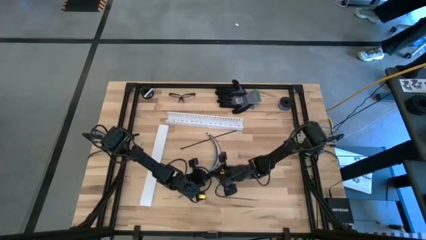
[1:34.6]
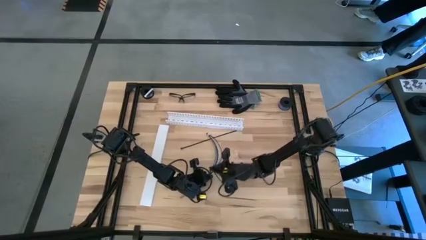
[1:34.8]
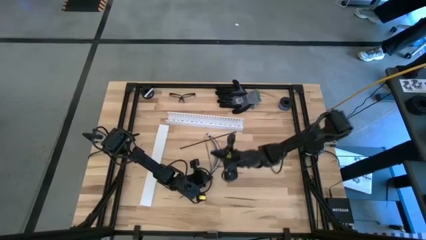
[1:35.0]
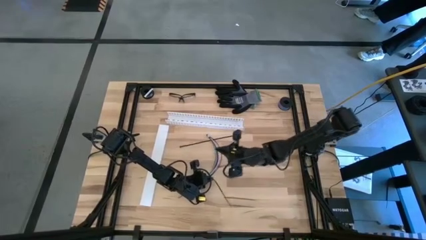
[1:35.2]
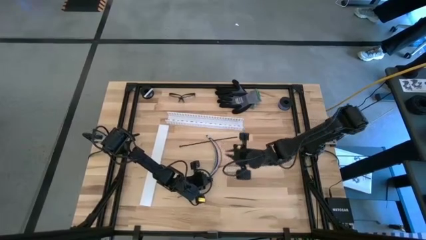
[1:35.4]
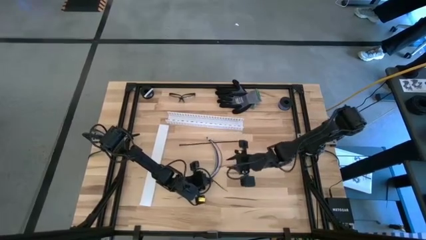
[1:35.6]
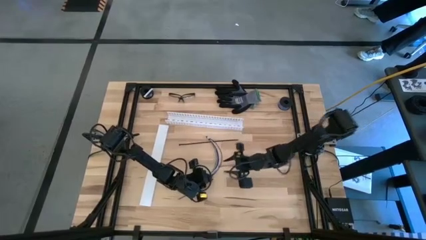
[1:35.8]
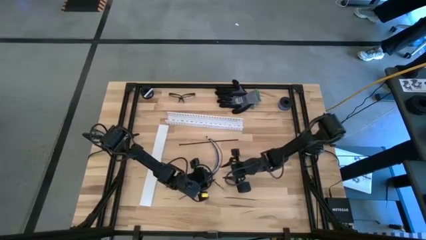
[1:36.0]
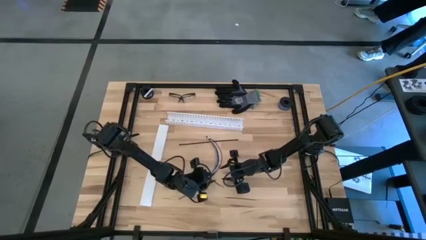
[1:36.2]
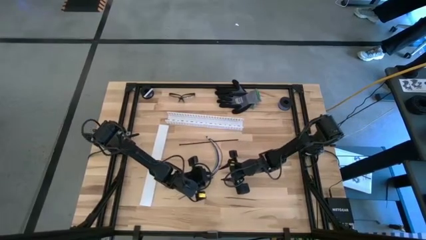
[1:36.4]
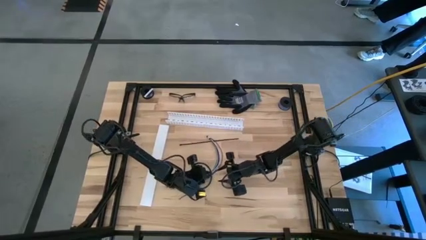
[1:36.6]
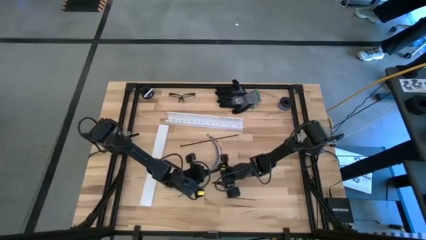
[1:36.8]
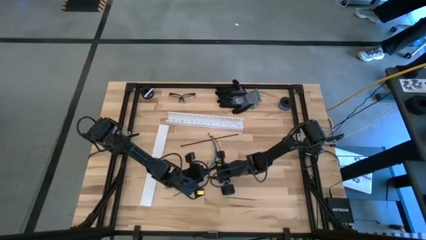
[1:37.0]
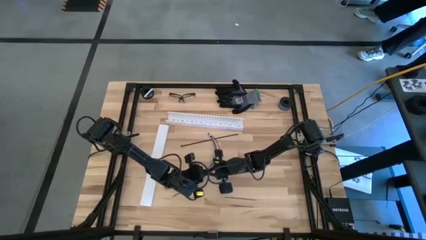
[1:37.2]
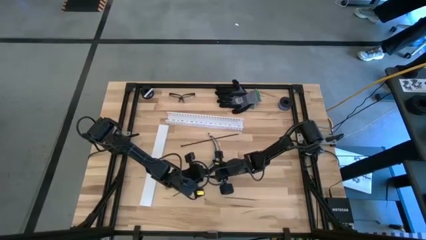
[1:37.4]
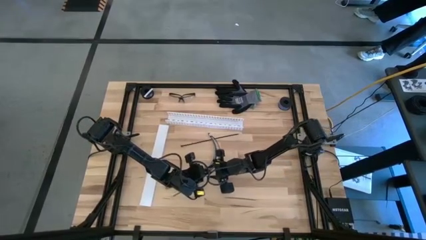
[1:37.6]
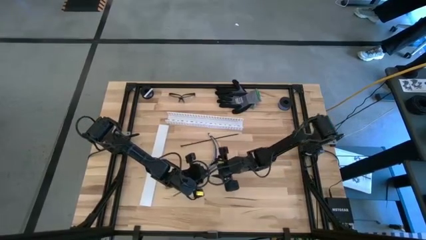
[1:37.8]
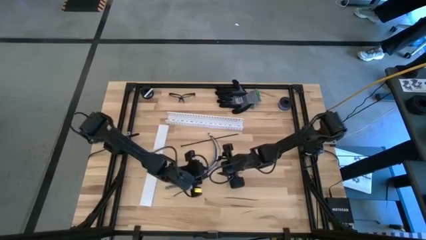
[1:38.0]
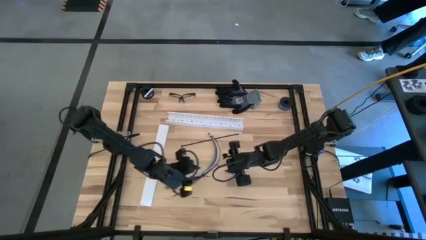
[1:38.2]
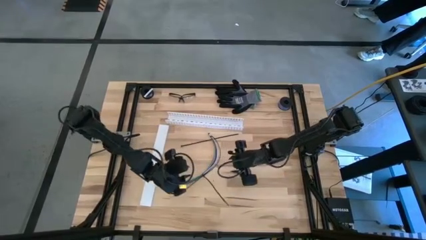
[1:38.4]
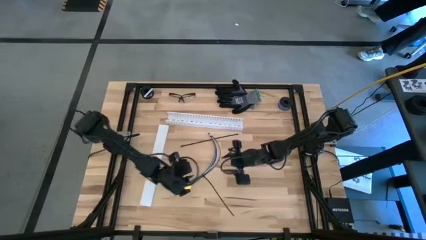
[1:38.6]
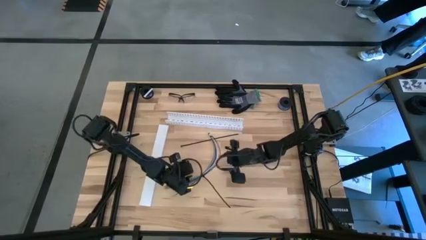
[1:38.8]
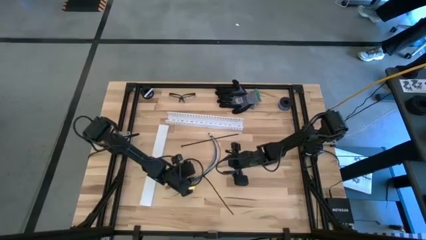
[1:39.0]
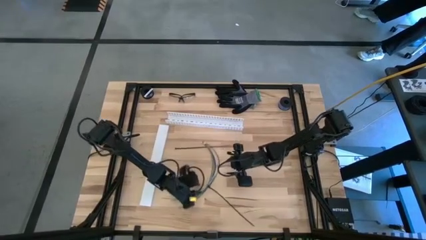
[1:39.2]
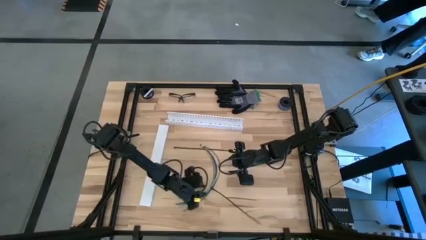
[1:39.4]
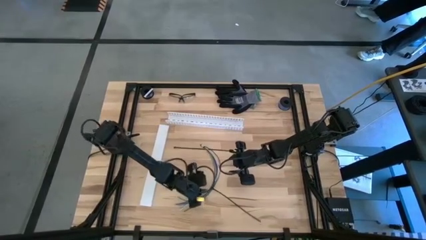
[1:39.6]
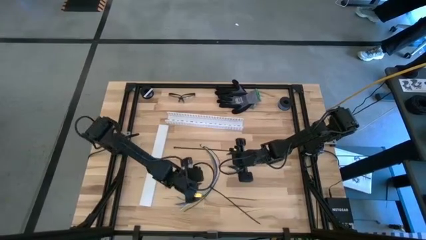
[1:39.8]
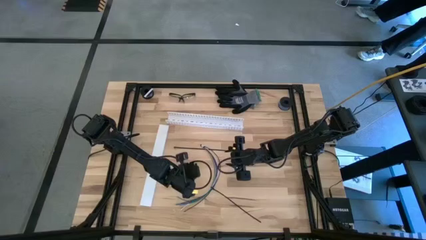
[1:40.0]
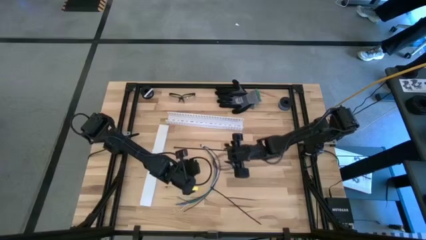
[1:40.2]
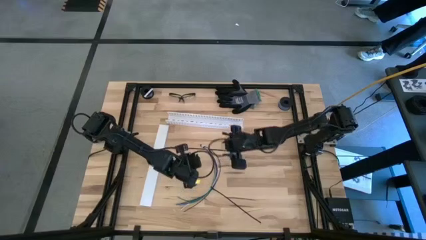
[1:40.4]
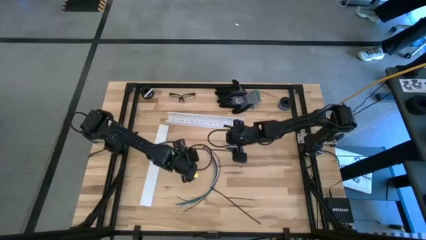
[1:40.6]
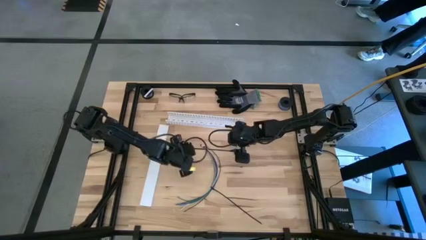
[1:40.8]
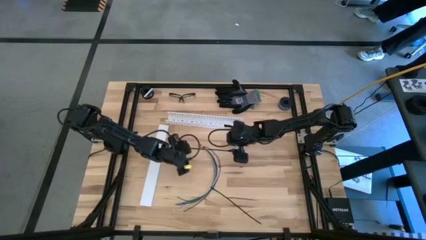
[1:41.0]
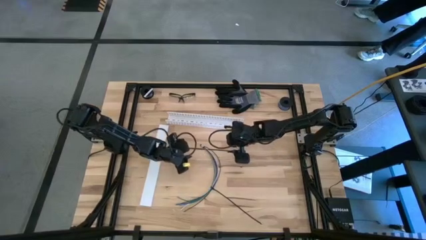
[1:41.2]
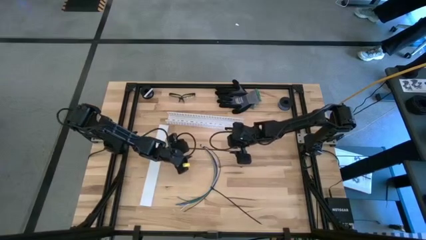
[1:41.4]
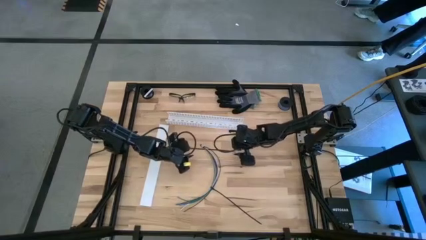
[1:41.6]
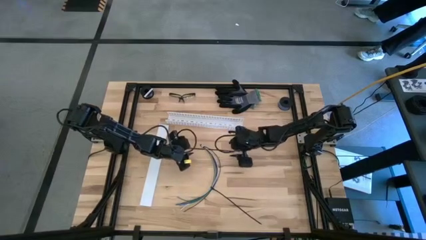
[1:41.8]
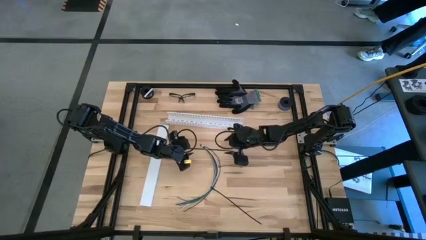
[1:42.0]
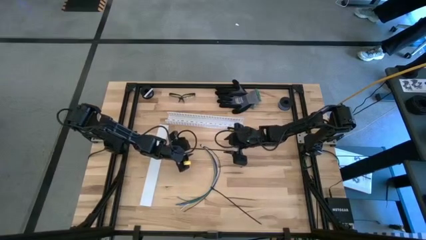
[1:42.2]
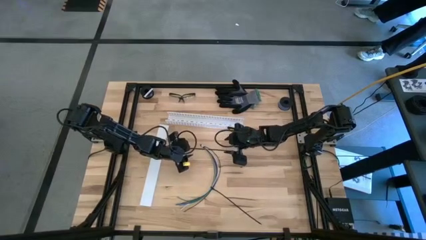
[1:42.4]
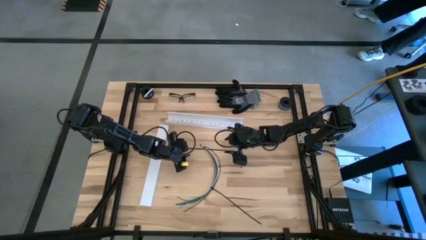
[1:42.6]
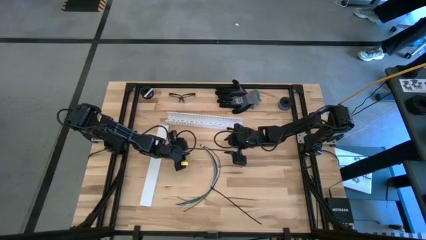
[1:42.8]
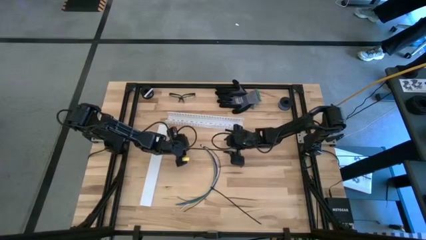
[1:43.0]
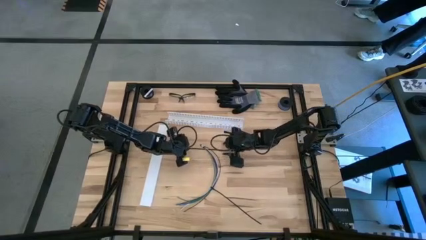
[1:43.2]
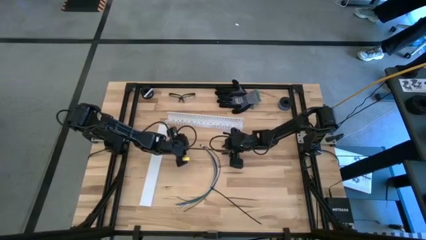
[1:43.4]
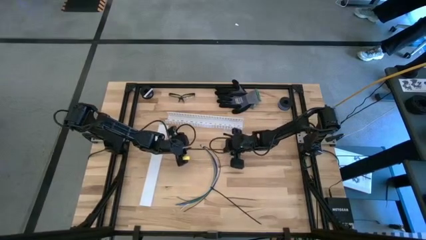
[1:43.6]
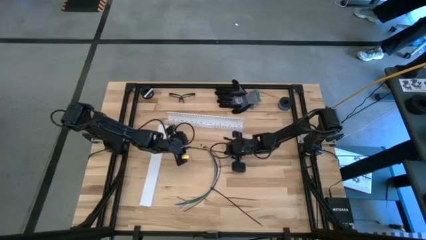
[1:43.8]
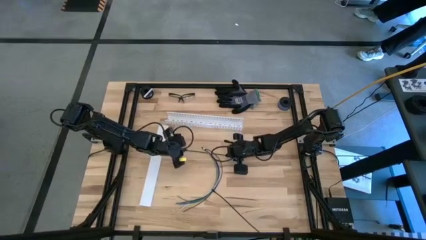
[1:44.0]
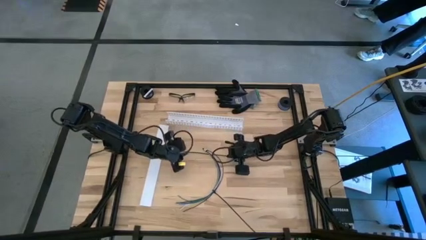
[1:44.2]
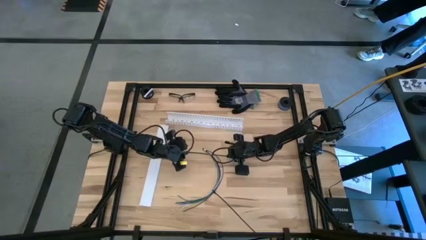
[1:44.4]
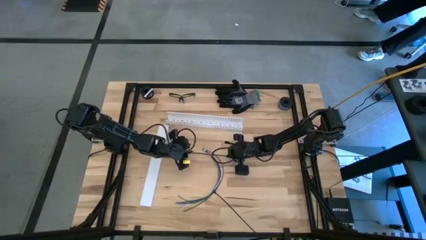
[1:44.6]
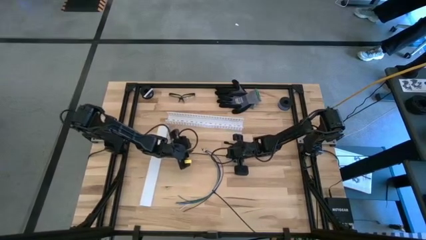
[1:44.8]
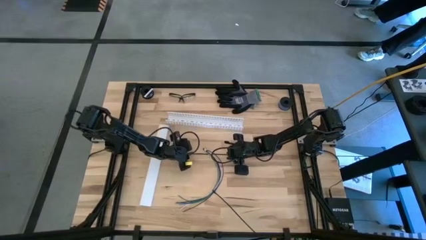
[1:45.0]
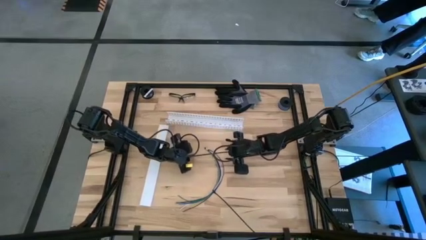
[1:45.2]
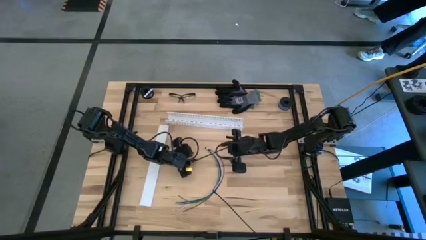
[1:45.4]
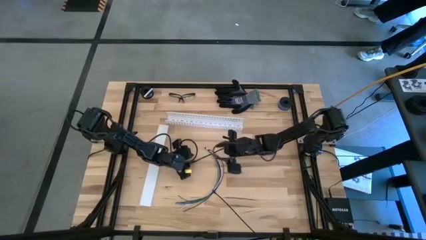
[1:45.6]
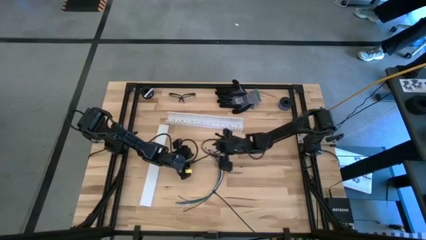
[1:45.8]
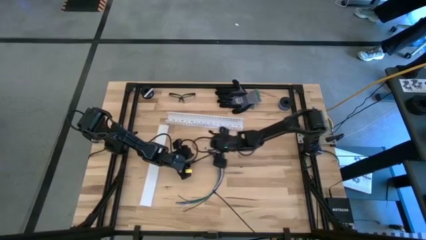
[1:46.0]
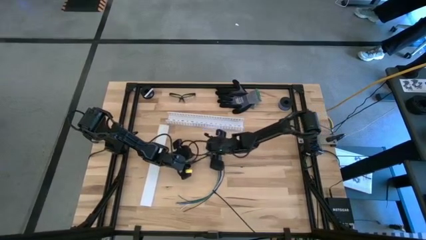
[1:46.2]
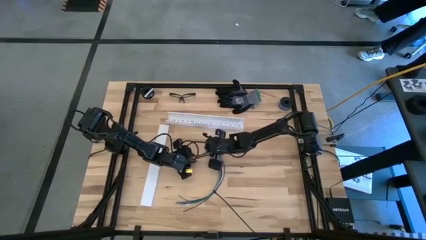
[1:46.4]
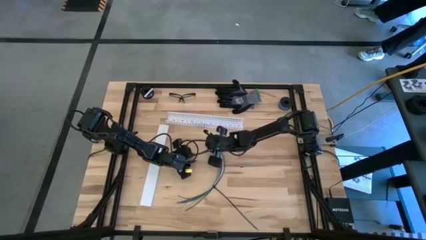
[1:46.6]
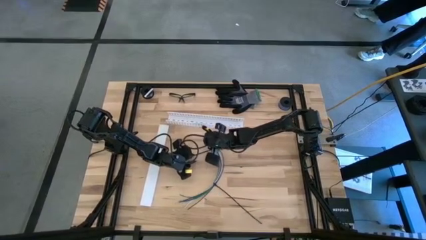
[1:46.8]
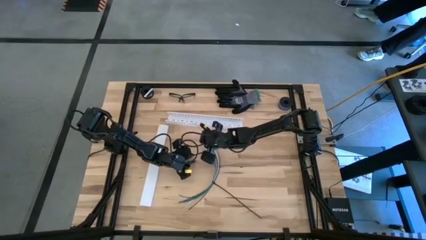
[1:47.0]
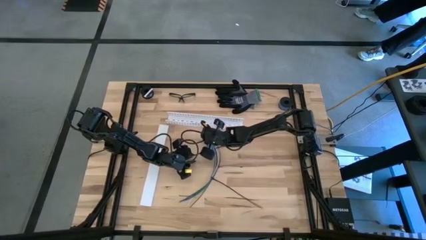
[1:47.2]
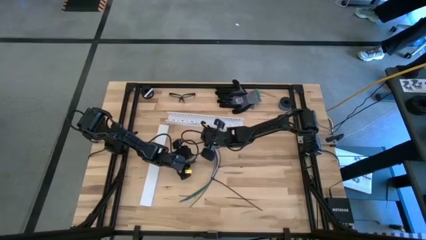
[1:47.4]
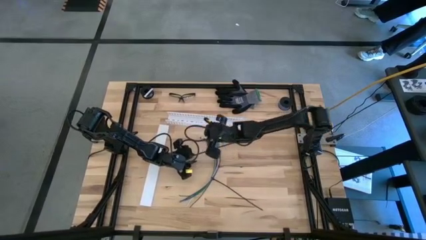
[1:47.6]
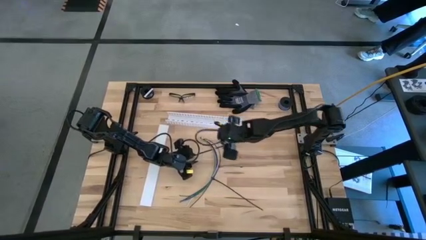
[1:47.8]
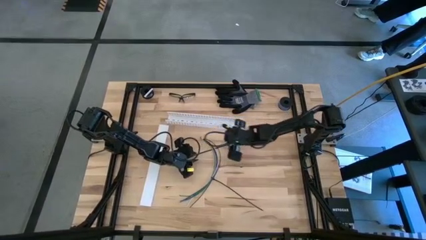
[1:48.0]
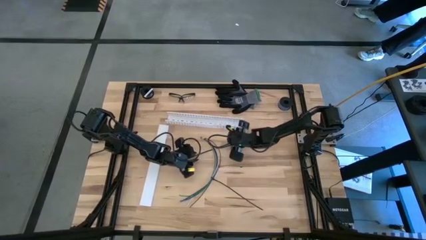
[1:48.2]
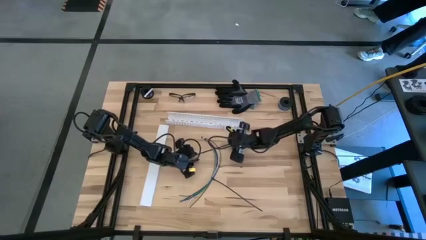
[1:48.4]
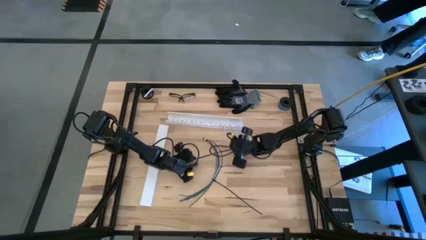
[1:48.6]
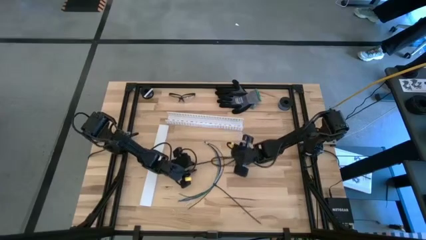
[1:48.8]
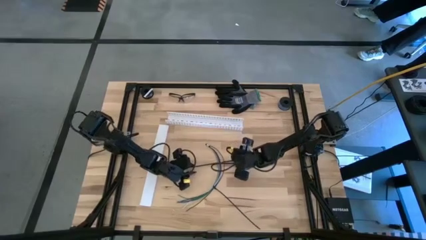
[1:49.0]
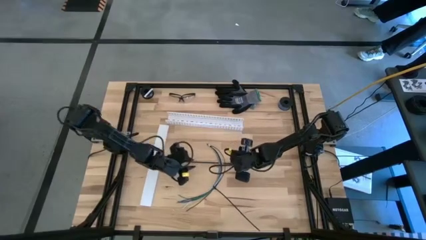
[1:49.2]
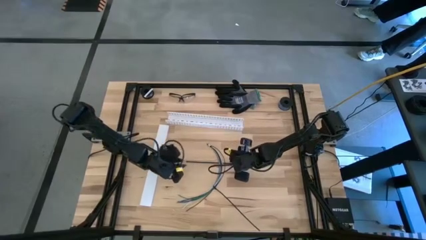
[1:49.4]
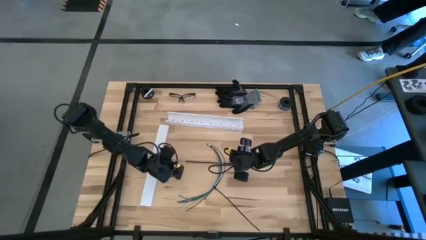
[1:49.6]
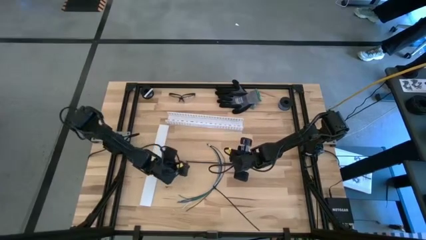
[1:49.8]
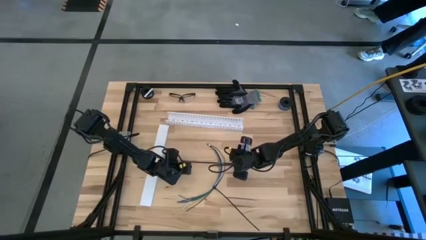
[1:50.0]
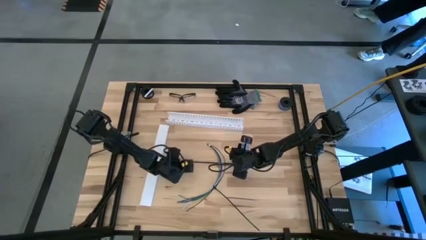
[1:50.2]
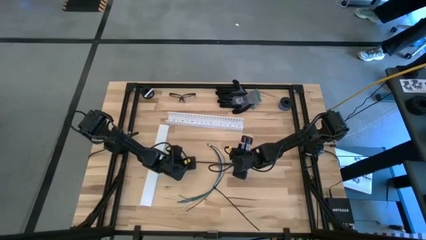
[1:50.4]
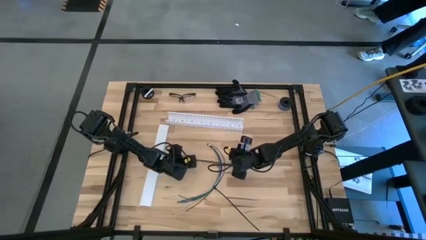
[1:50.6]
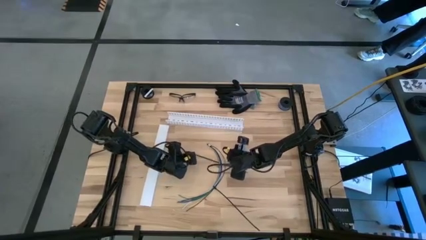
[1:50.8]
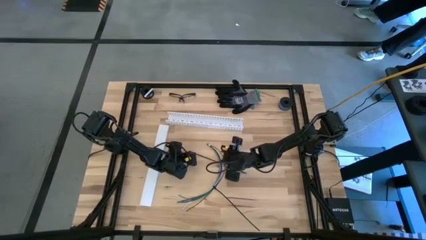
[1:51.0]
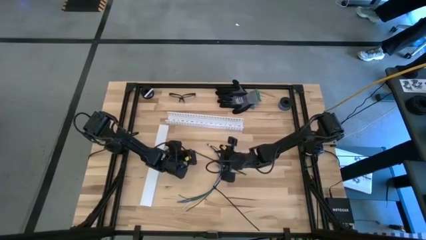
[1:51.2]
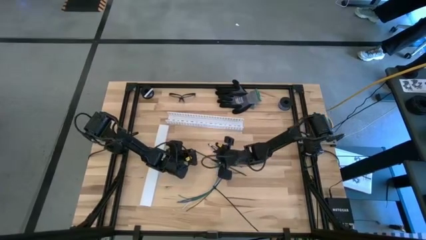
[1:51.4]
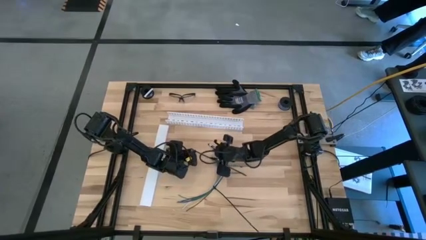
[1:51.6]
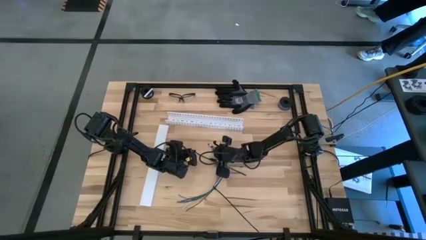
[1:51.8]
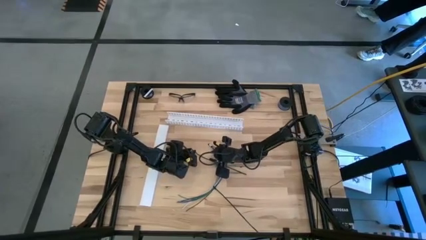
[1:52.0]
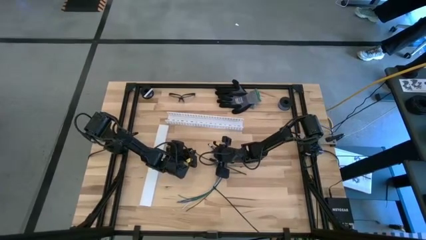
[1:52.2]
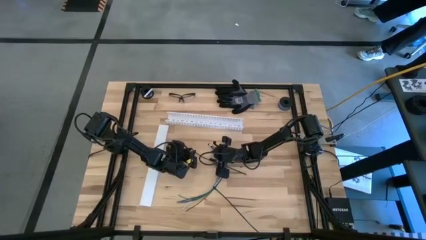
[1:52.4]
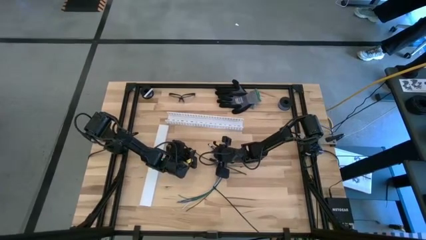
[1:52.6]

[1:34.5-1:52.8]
Task: Ziptie cables
Wrap the black zip tie on the cable
